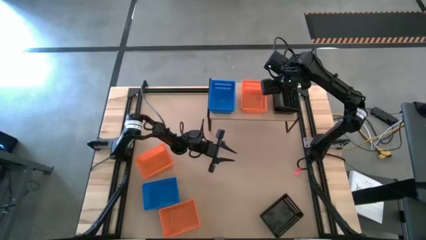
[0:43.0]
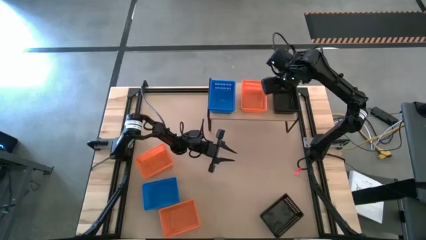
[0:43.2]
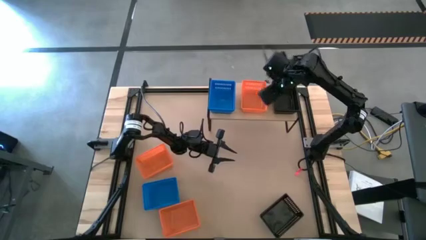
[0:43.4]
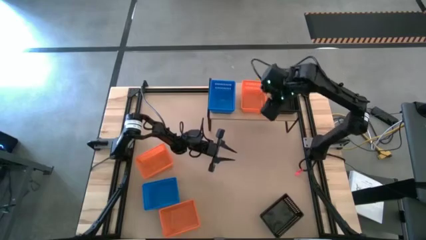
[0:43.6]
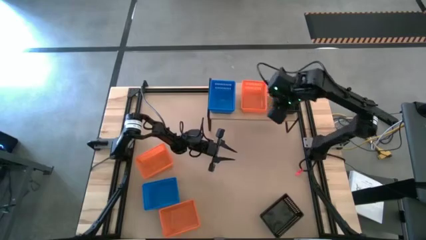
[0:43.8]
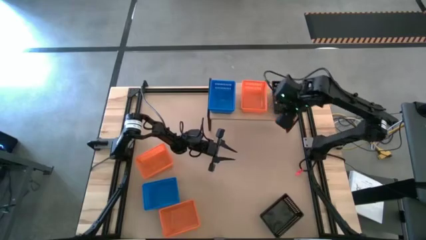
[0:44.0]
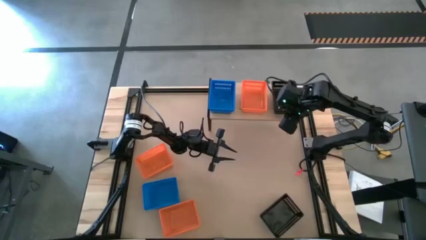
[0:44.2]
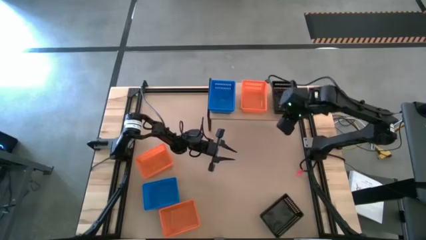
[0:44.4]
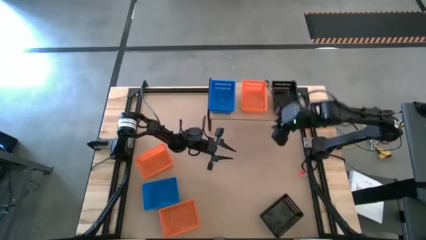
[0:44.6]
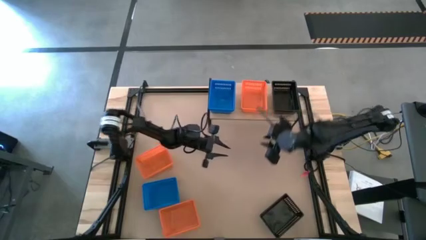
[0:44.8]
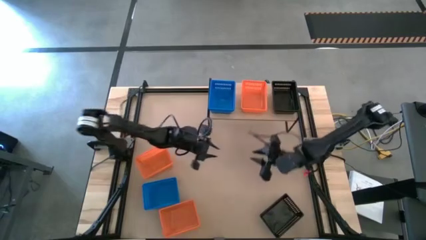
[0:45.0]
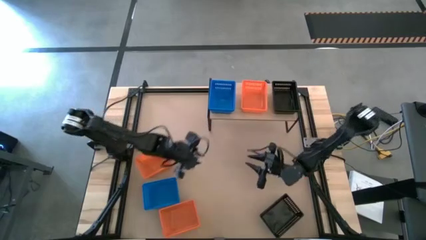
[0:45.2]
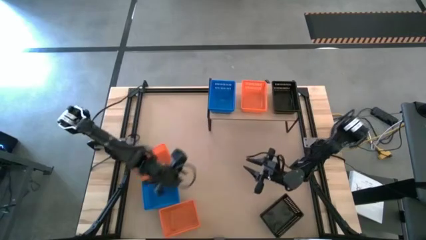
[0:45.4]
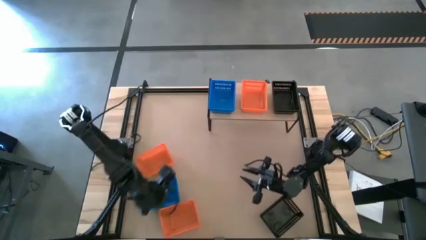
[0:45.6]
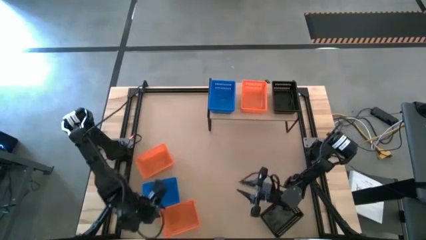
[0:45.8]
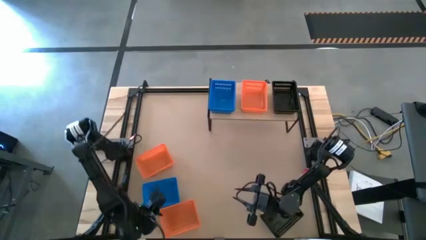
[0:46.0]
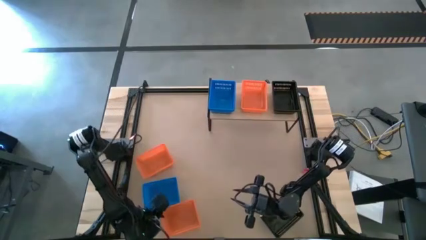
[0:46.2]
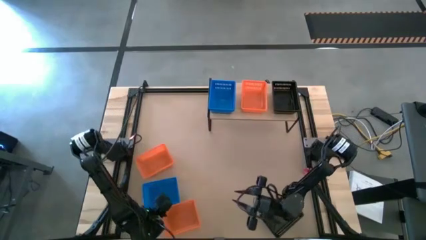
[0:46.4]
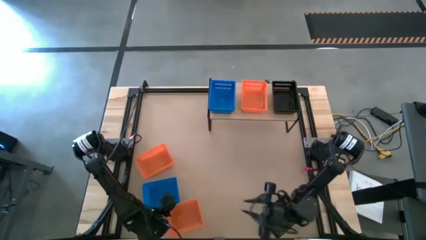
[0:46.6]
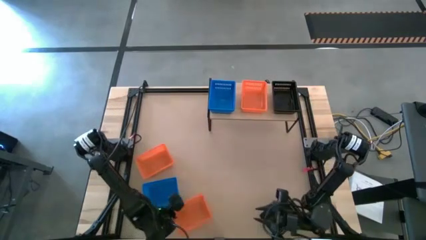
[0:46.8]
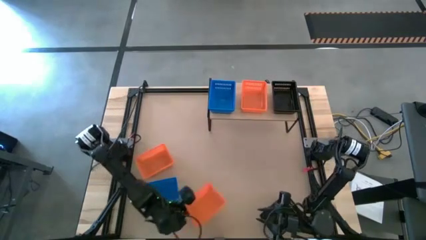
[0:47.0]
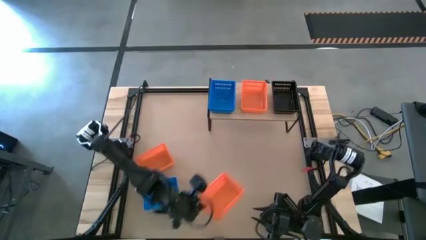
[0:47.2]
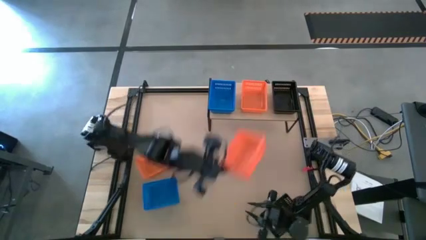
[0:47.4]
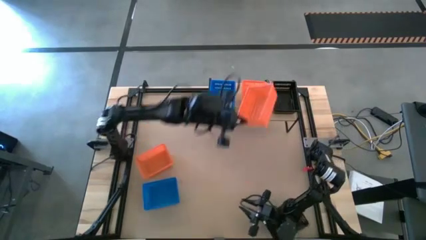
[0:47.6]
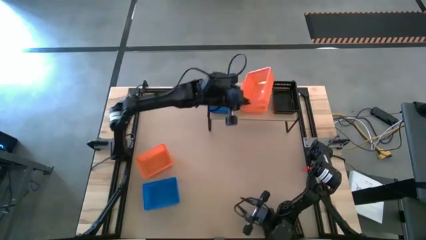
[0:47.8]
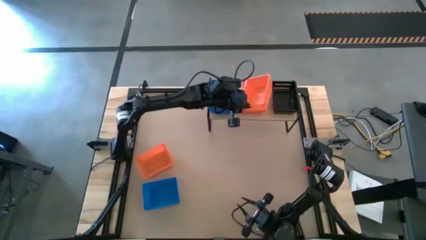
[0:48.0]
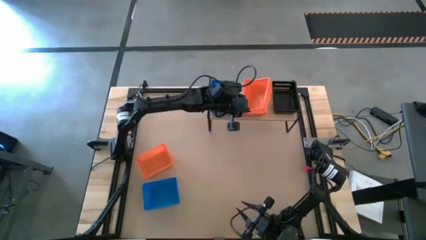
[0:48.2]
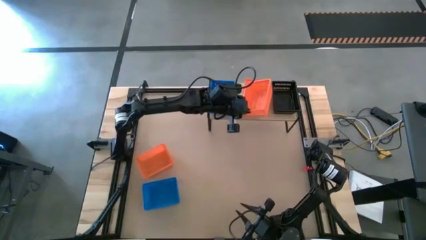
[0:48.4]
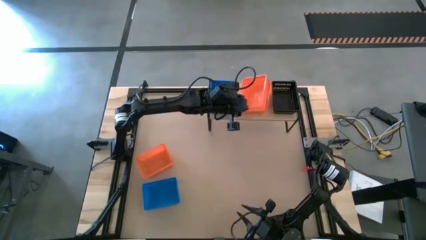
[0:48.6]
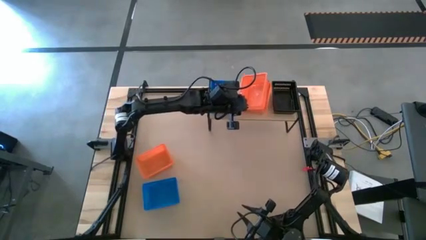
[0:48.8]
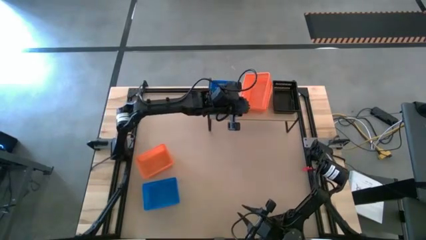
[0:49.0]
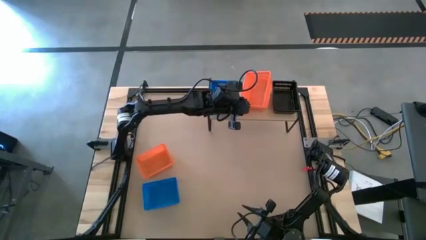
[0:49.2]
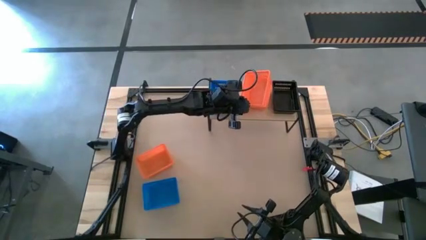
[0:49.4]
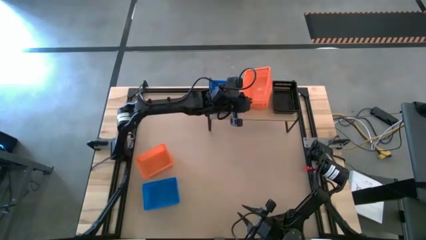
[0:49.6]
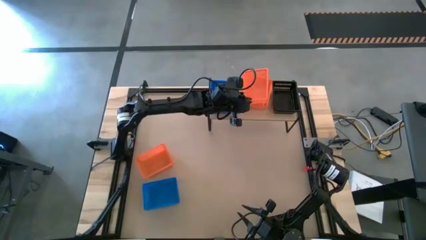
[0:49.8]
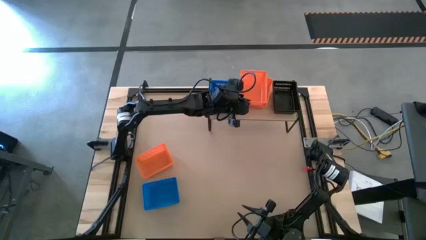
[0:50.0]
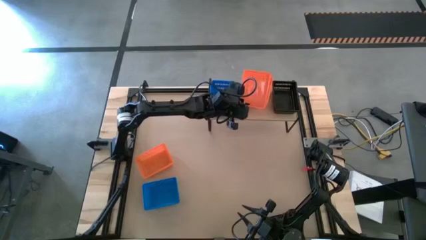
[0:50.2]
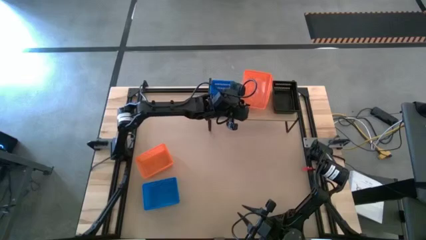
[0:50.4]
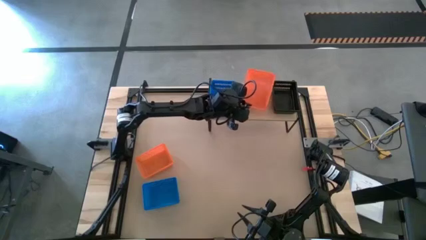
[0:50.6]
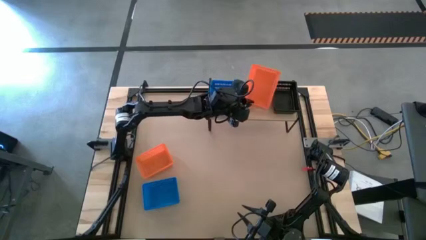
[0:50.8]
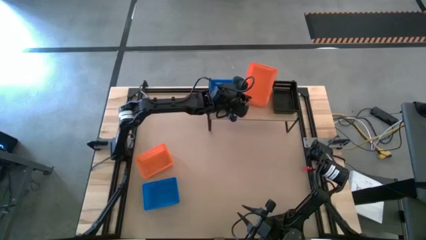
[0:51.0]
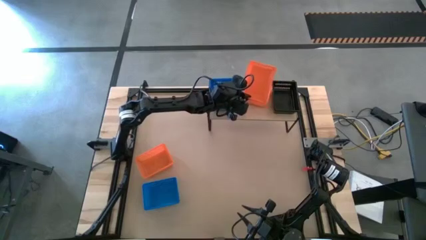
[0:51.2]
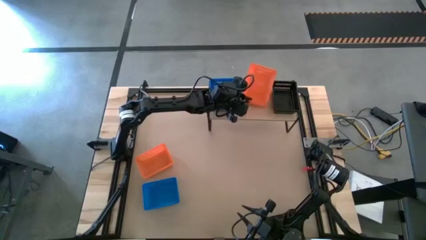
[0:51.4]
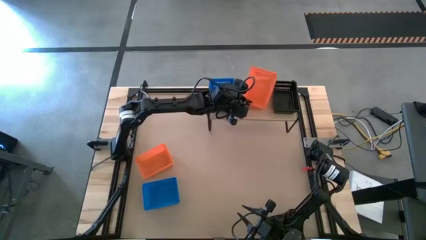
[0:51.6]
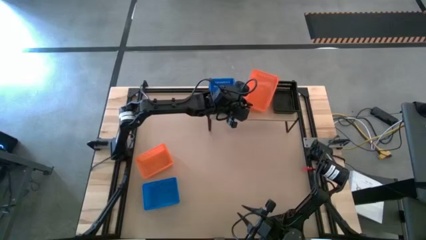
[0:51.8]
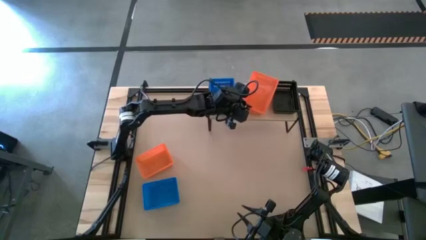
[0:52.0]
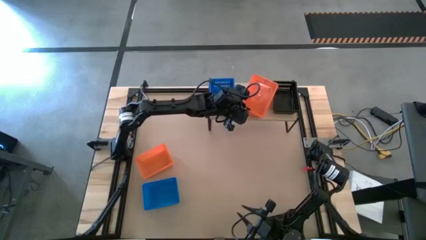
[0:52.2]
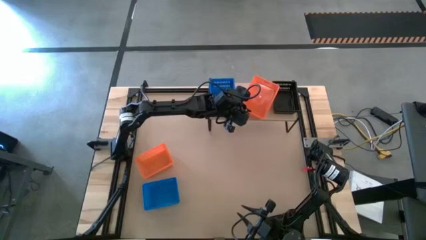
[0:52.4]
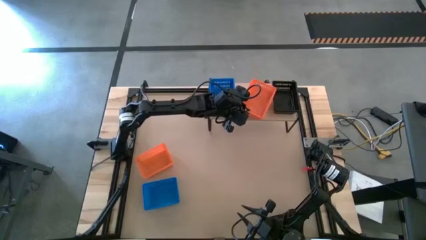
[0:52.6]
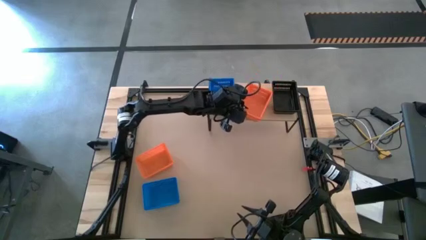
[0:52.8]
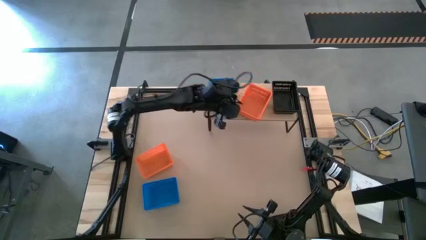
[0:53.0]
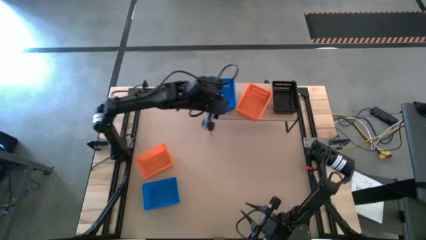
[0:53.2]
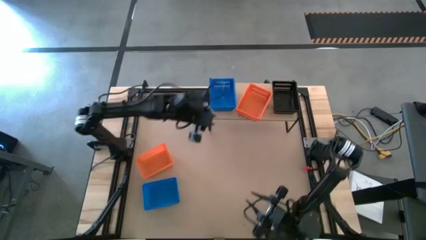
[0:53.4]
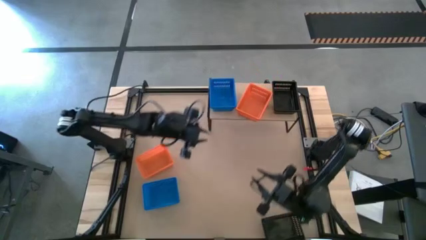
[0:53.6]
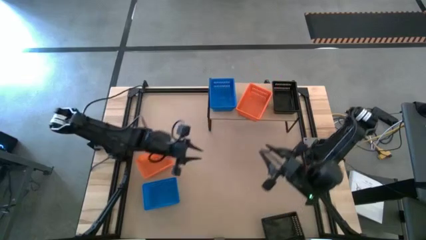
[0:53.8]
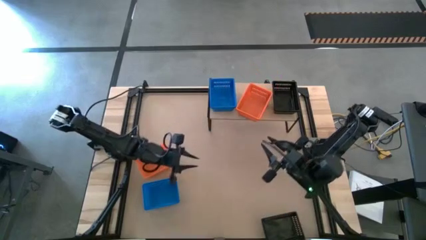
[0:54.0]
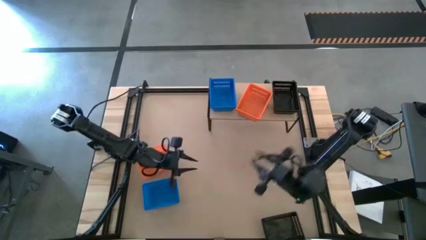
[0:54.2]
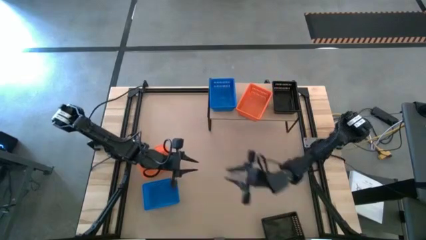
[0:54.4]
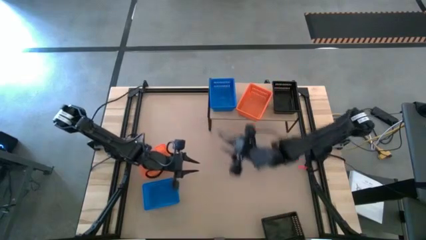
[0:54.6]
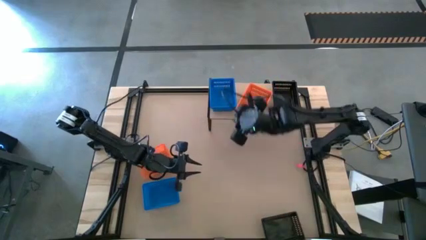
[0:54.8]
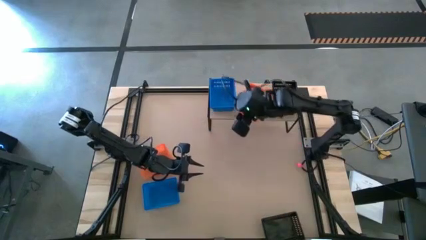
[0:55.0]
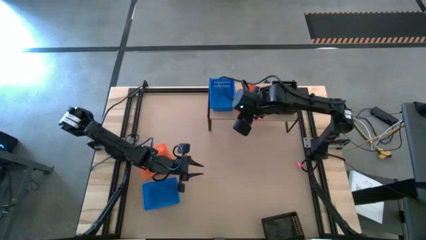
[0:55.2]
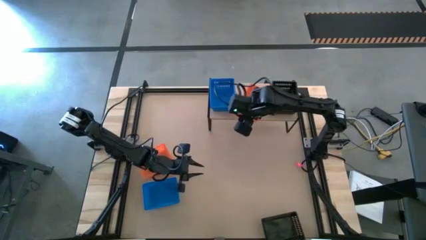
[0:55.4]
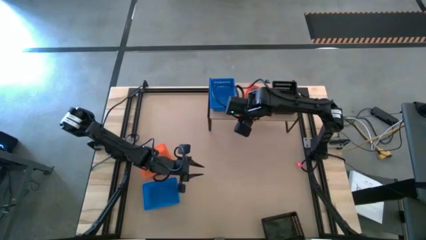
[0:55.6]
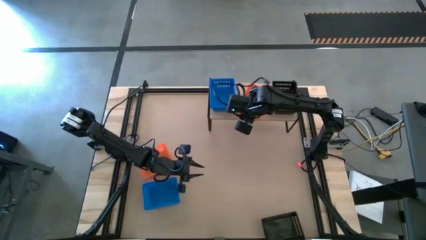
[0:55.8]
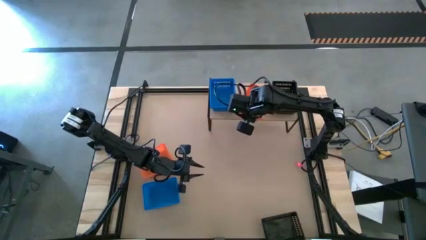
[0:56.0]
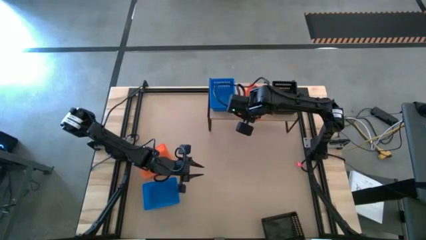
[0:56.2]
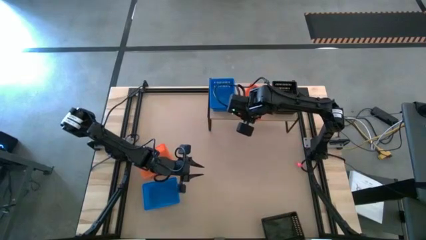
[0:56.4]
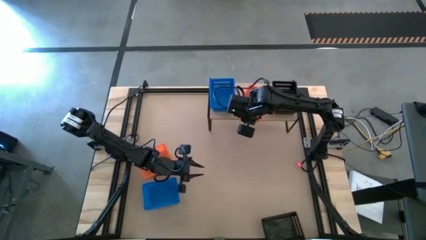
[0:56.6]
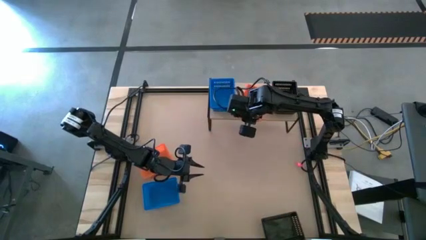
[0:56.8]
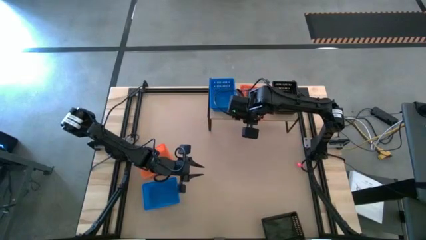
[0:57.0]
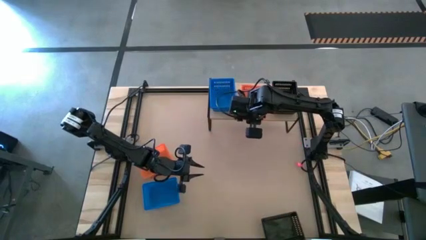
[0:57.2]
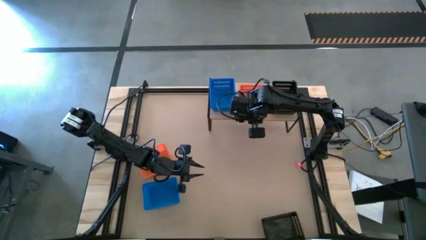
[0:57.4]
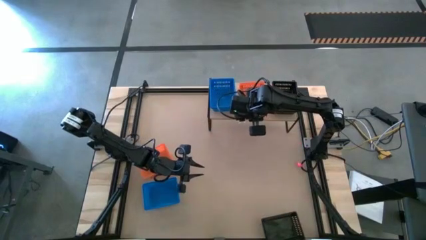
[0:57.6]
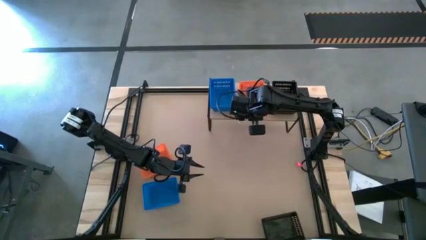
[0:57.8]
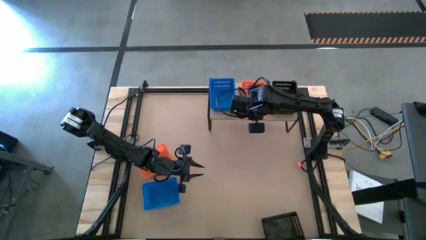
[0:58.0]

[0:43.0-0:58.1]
Task: Stack baskets on shelf by color
Stack the bottom orange bin on top of the other orange bin on the shelf

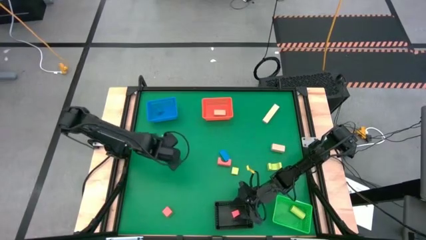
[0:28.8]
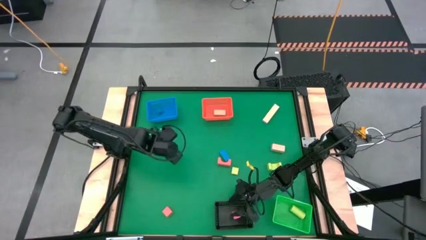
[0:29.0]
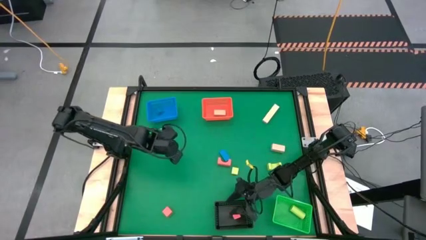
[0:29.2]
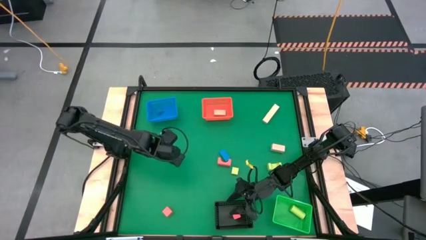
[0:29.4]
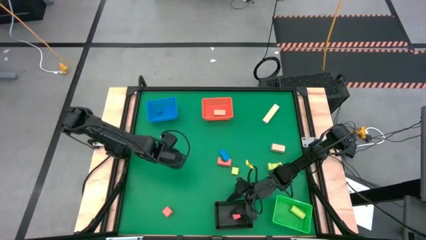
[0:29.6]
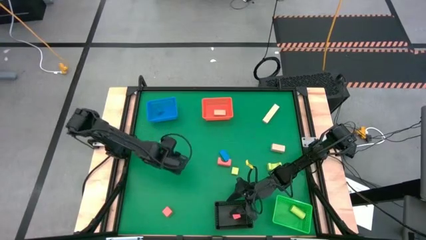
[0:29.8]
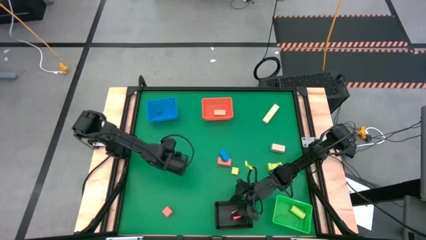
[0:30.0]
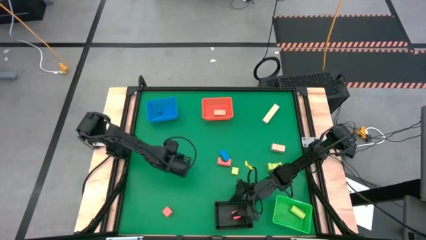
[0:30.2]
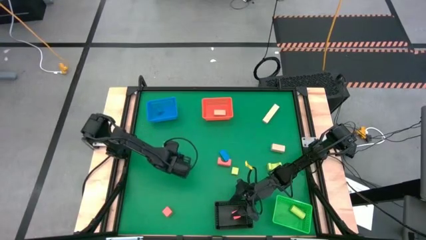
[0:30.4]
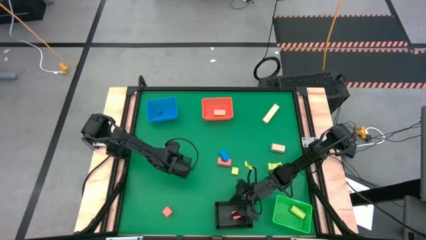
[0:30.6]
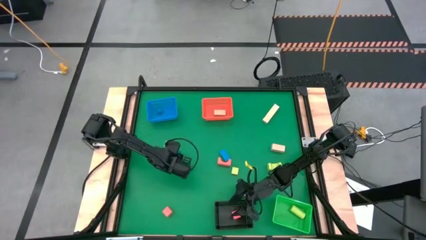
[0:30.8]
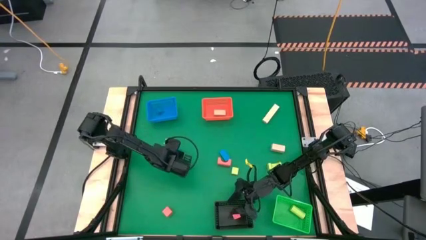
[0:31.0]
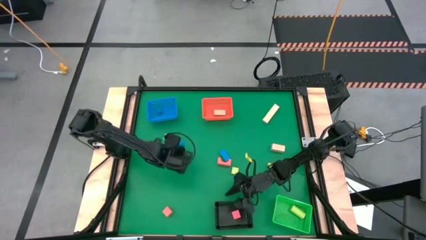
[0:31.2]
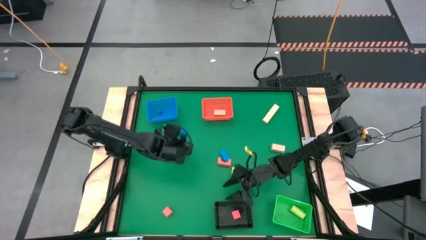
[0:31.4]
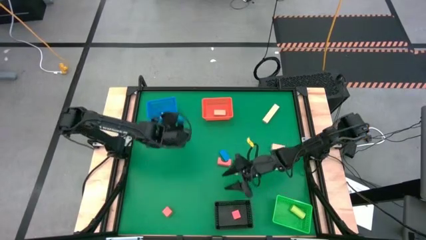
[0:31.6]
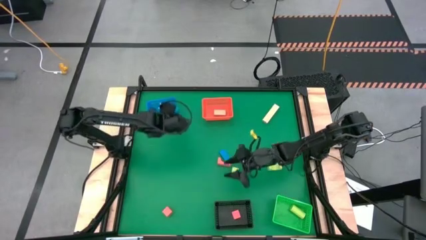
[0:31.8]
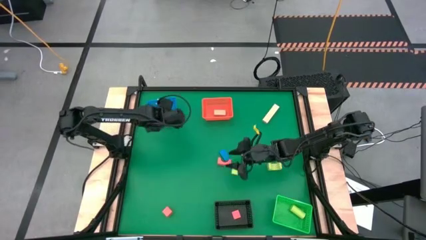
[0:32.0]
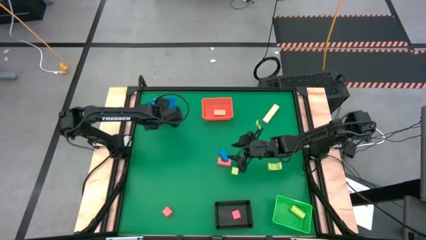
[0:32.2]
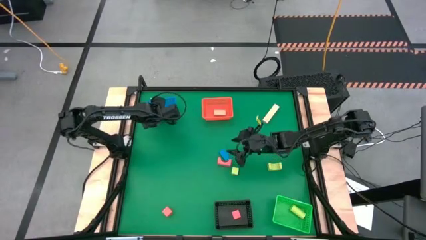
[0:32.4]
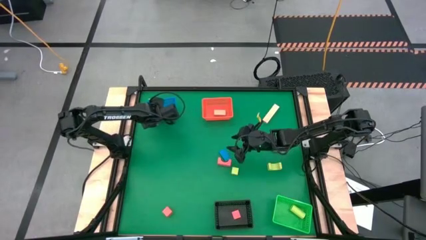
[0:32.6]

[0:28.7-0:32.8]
Task: Sort & place blocks by color
Put the left blue block into the blue bin
